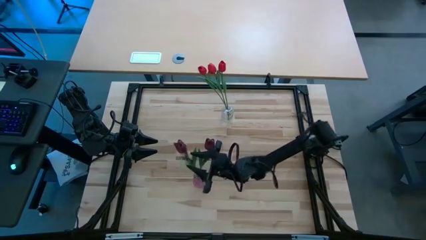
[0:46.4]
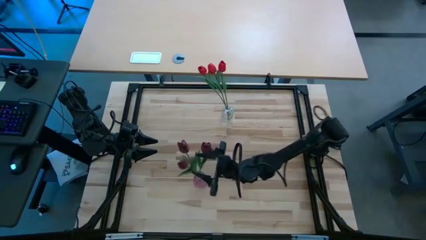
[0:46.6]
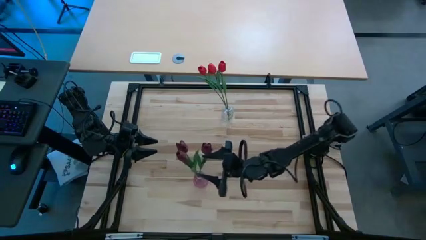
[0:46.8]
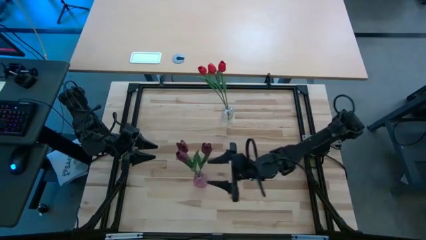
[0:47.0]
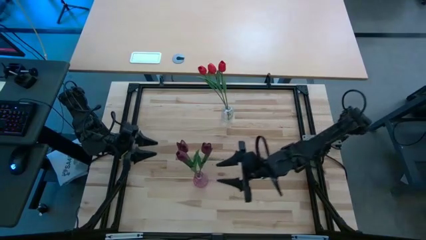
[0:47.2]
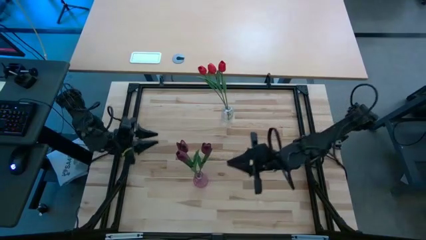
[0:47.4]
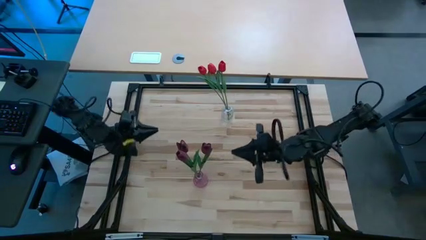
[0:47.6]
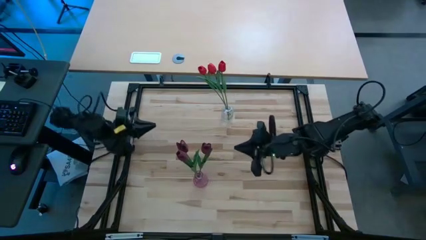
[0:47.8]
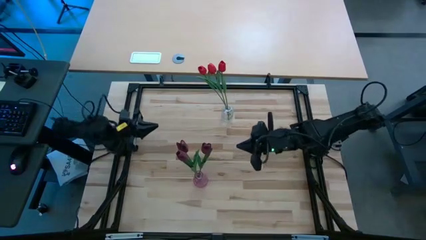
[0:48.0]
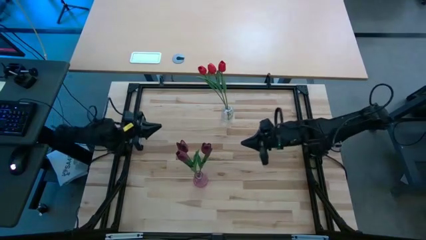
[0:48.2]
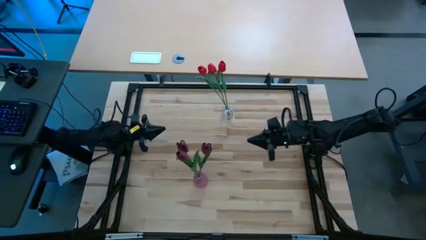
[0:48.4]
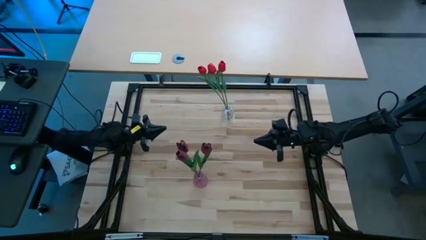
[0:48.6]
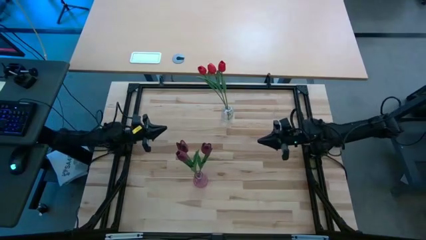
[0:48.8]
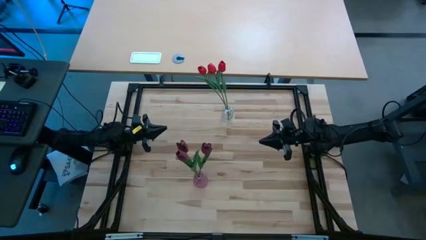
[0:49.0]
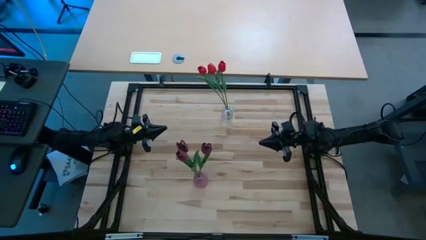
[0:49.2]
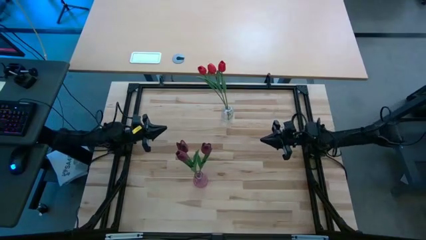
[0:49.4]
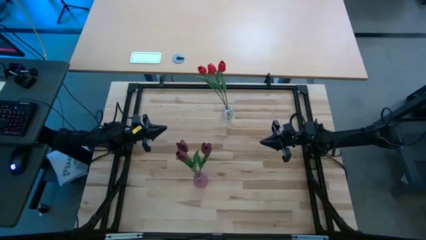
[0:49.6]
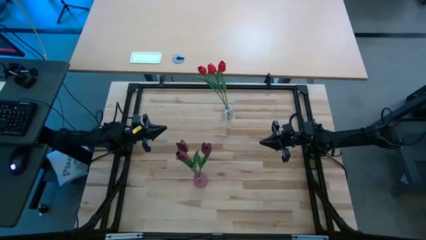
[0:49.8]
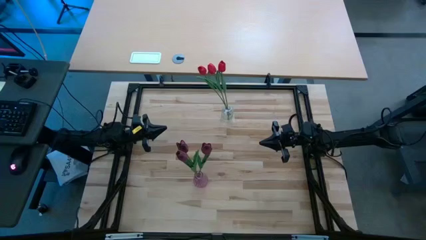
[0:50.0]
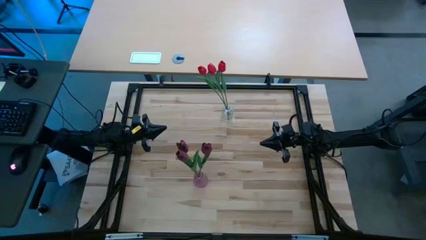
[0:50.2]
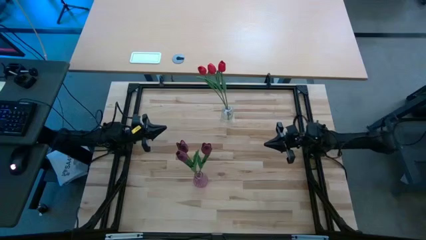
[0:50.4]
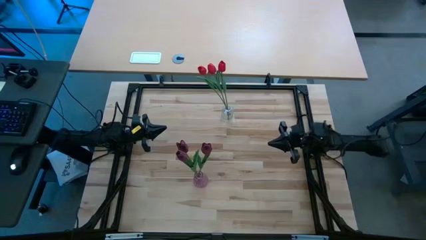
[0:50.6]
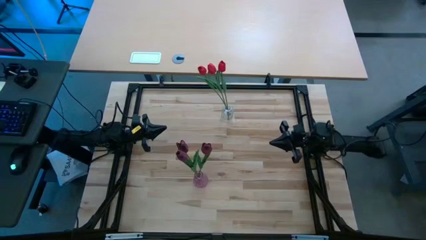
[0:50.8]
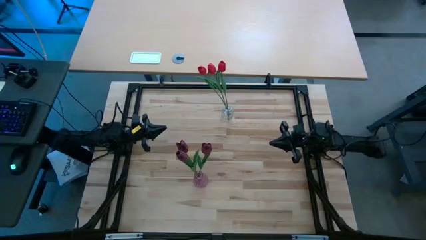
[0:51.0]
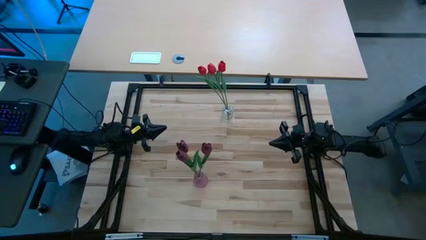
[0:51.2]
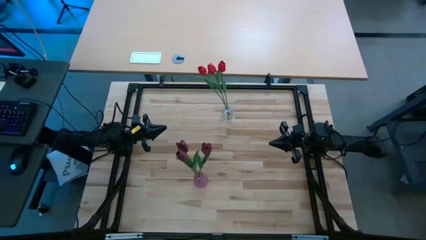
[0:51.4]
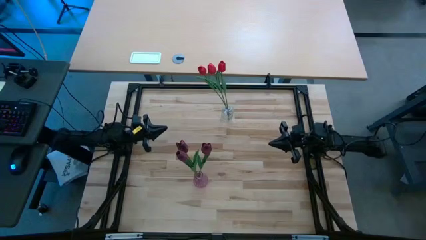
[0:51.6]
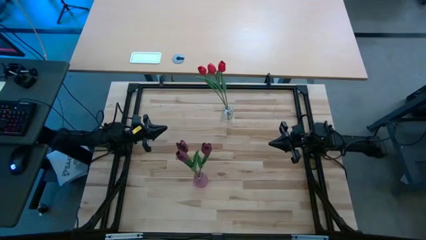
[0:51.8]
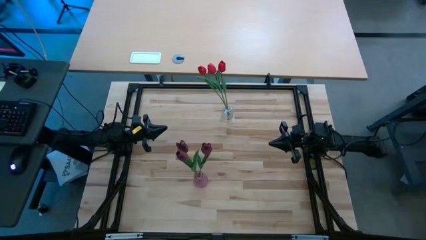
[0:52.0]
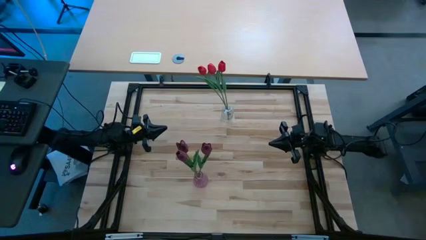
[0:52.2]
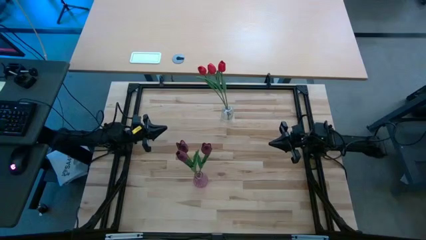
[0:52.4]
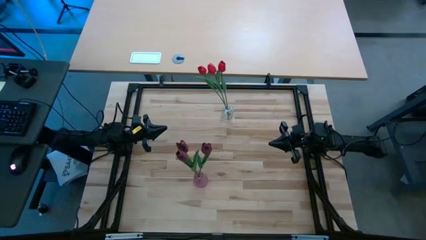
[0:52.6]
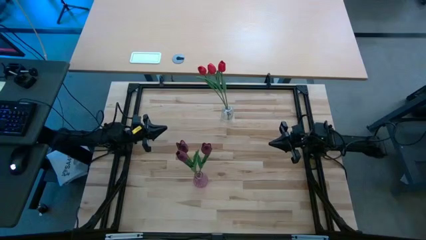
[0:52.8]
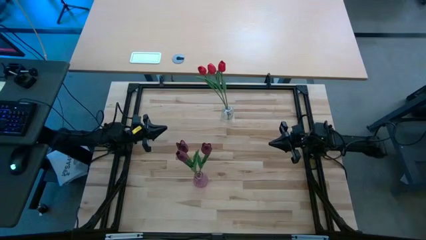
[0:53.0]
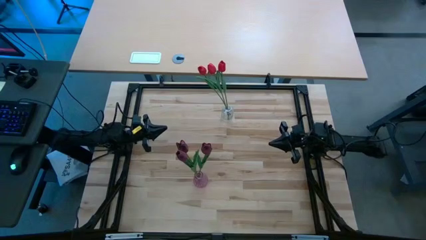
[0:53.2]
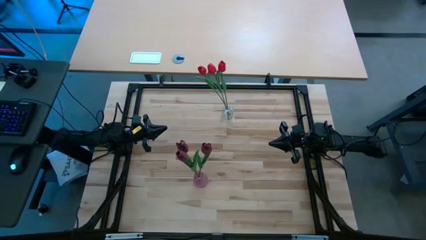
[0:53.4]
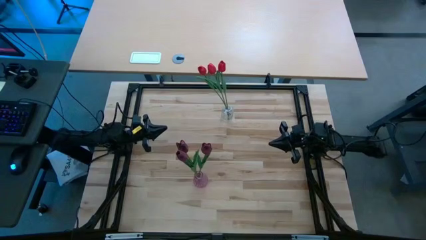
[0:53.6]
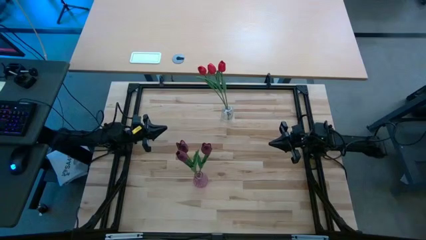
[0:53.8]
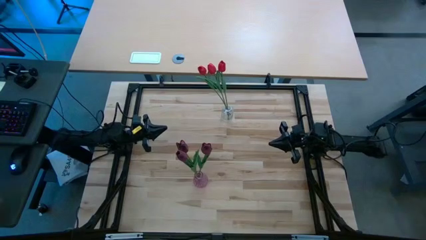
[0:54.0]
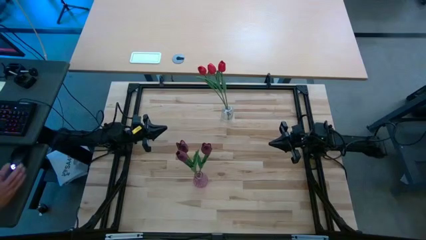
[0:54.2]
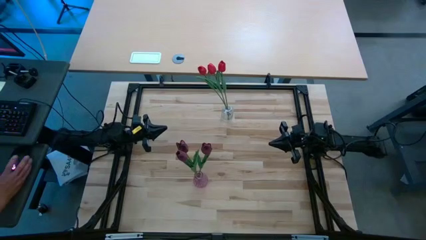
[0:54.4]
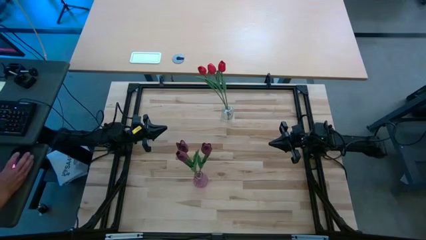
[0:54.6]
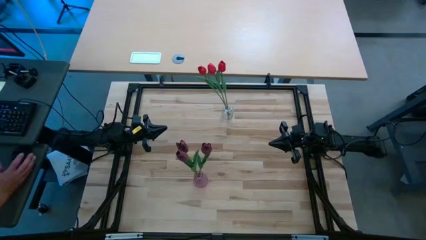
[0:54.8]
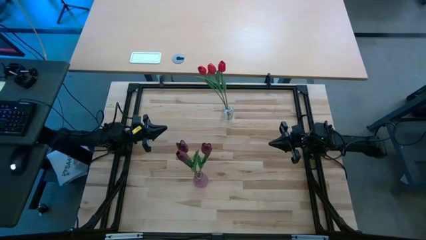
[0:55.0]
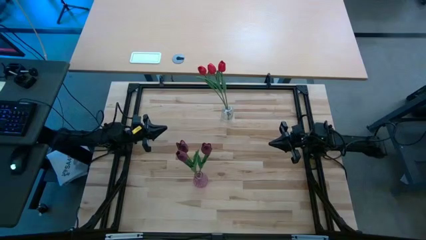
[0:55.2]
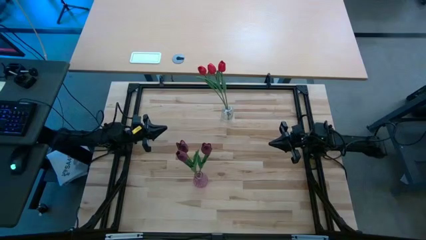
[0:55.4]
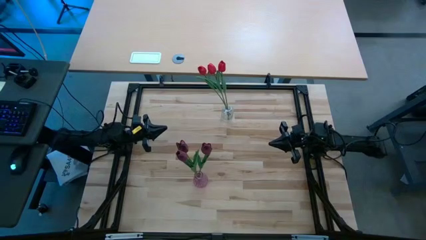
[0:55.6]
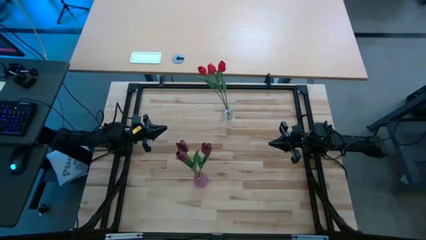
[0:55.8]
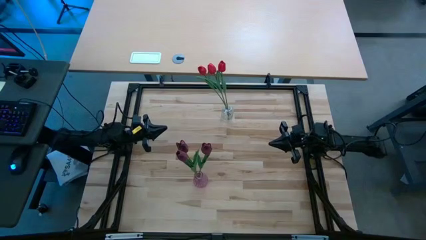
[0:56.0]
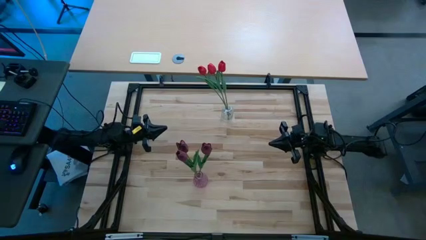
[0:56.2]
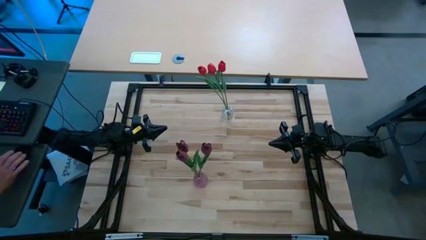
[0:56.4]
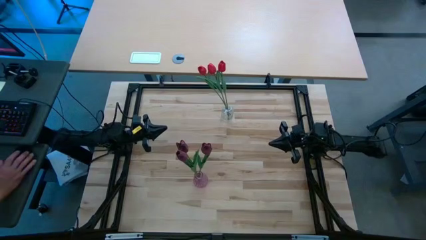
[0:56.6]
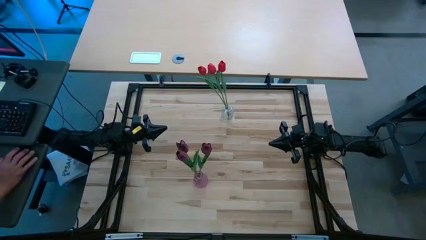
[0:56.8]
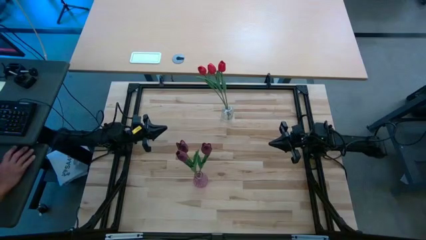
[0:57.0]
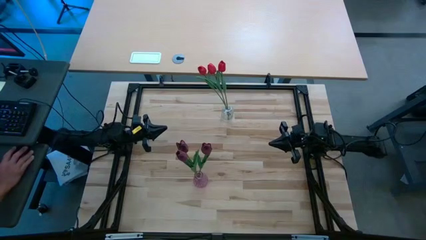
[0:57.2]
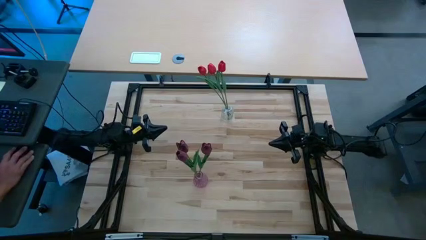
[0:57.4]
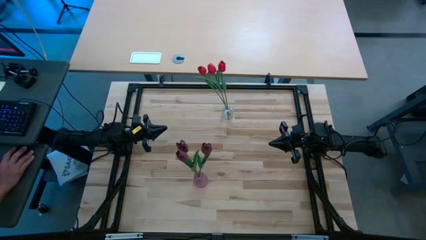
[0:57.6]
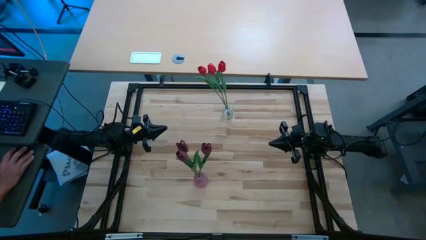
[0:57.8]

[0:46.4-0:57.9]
Task: Sort flowers into vase by color
Return to Home Position
